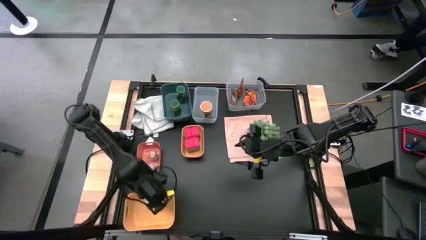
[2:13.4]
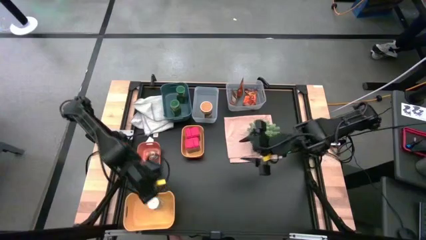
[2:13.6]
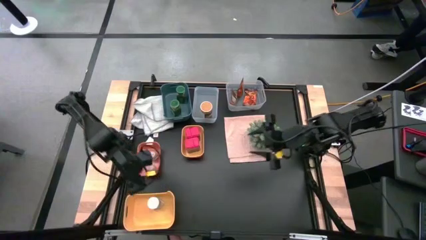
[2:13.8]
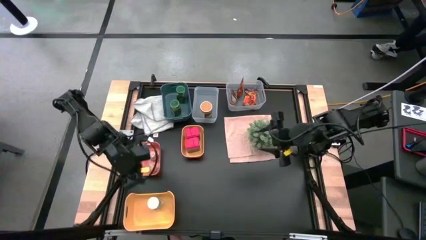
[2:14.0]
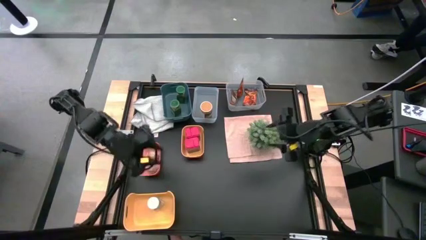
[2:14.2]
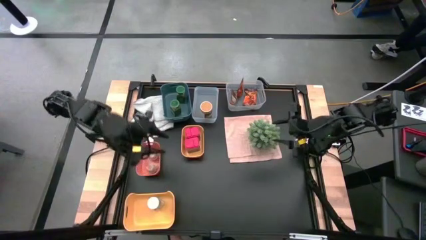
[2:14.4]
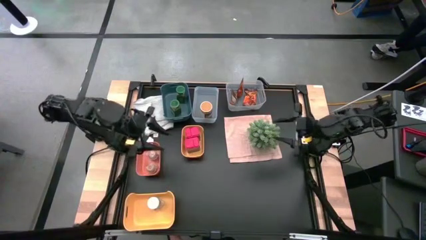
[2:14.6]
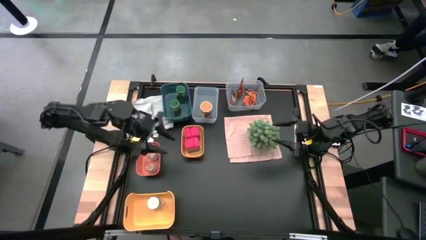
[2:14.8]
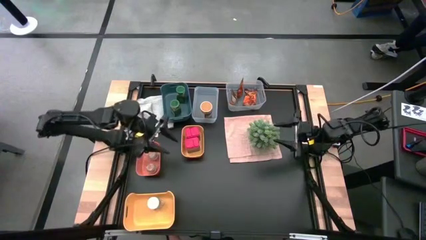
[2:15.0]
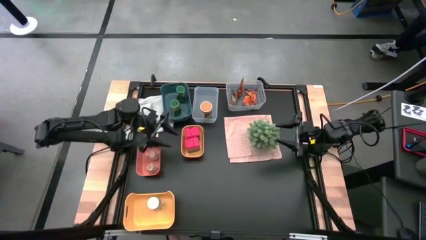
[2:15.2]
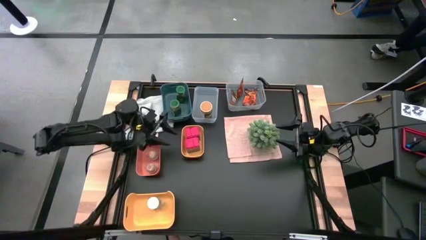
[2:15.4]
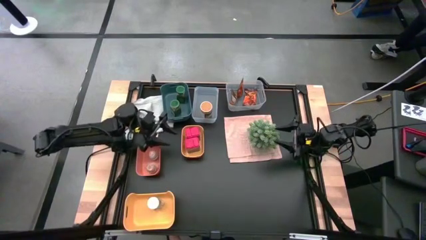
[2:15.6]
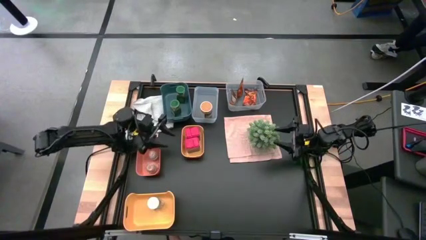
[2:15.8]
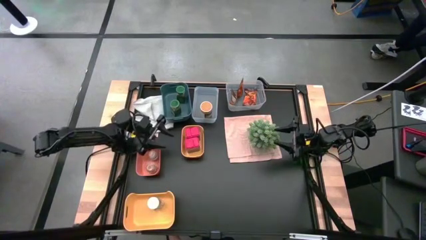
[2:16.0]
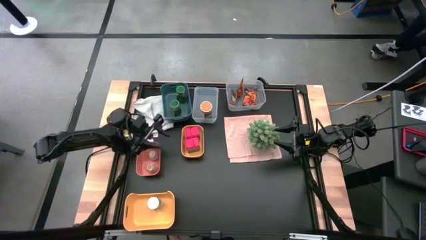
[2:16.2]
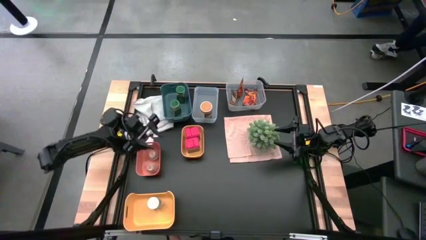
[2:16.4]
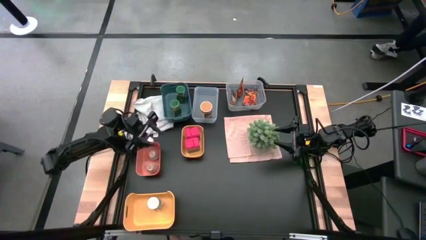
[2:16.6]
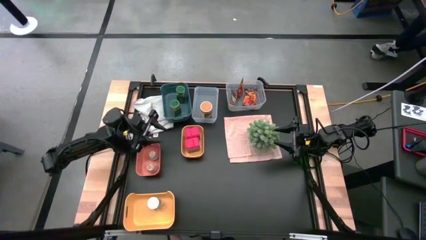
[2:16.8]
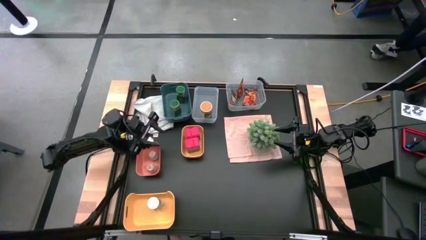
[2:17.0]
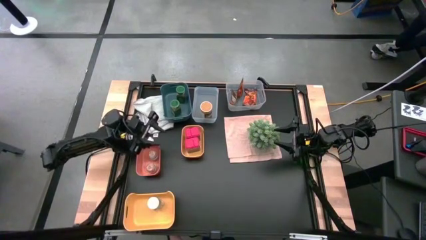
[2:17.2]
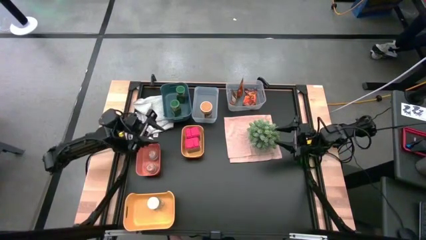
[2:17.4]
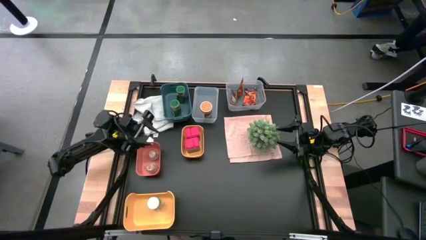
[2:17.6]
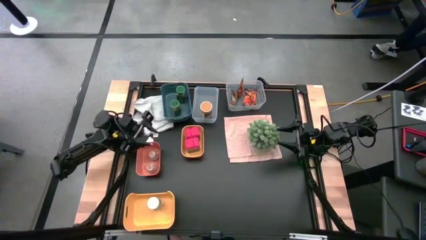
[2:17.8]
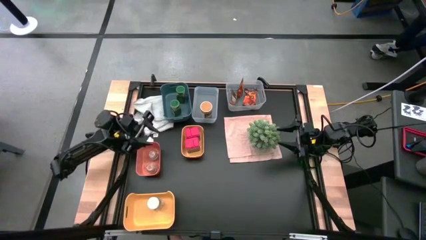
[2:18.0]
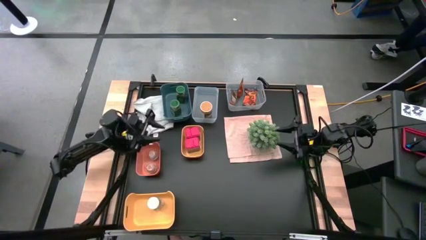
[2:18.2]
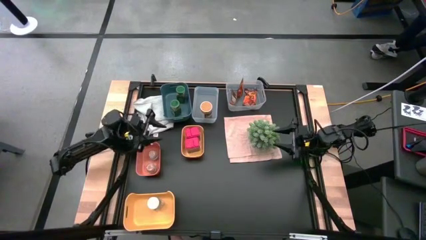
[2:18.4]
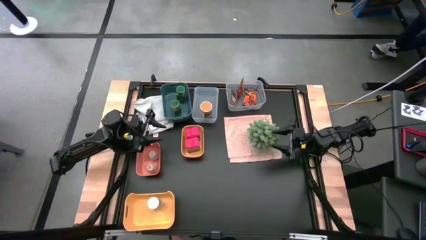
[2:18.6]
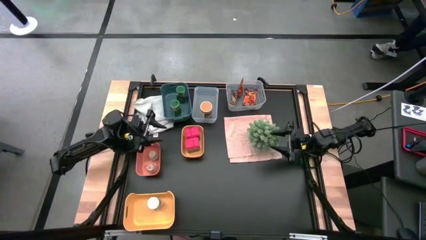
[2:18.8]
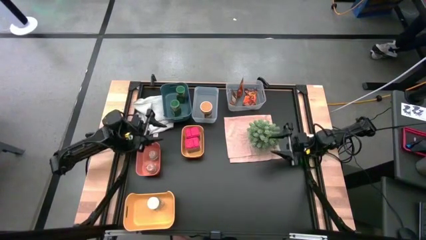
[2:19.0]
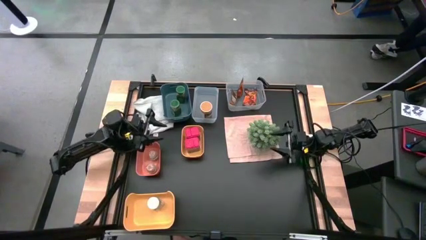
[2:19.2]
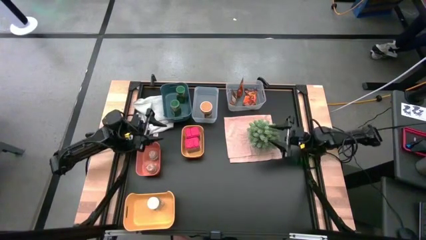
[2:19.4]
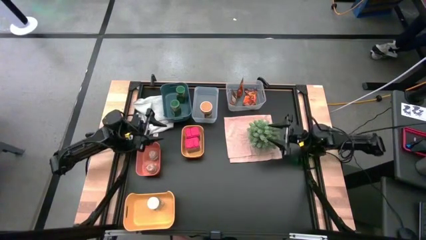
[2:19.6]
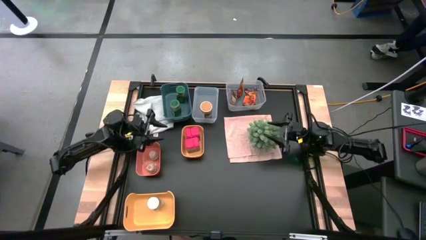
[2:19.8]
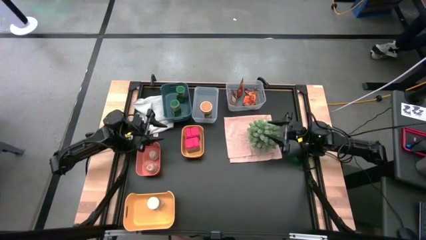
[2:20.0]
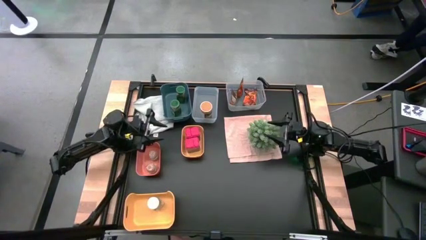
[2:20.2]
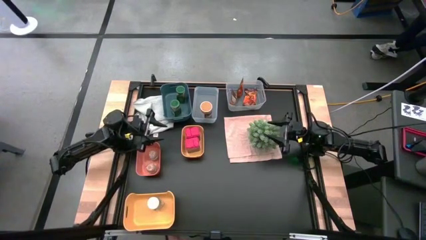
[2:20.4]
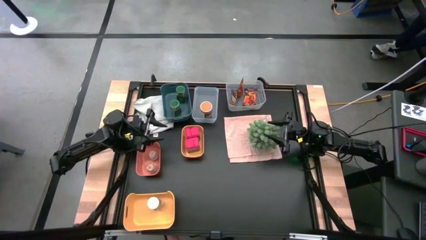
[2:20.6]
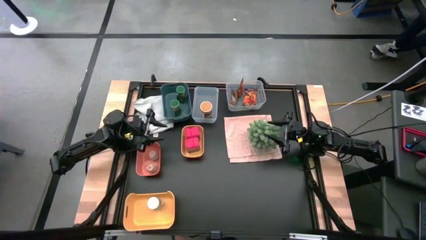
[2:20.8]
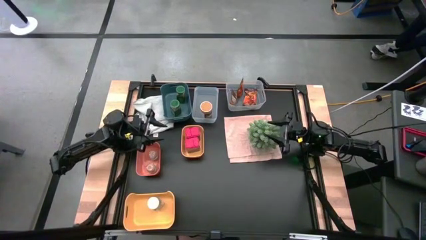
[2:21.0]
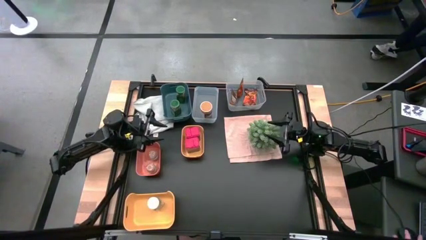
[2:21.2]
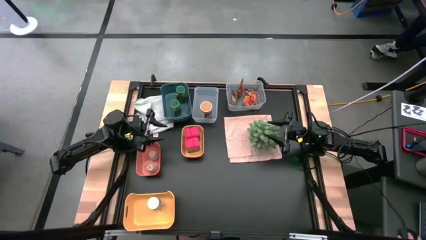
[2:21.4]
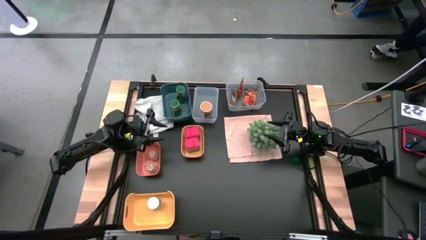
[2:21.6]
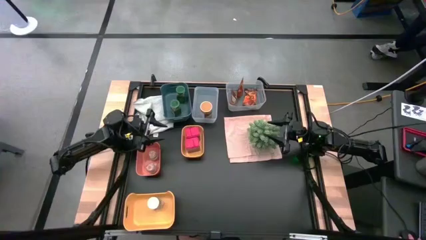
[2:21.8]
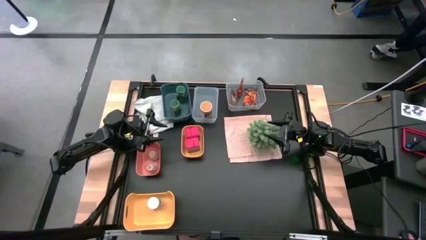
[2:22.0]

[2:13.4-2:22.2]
Task: Sort spices by type
Return to Home Position

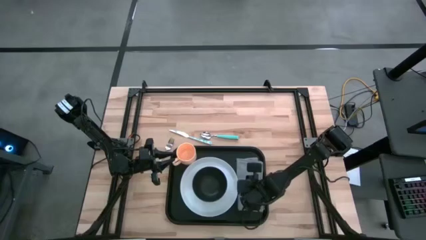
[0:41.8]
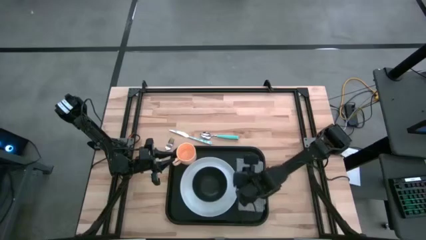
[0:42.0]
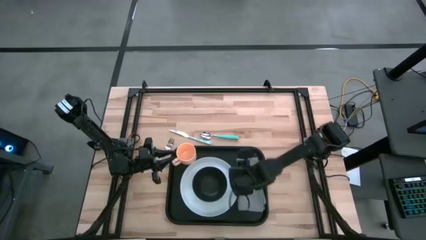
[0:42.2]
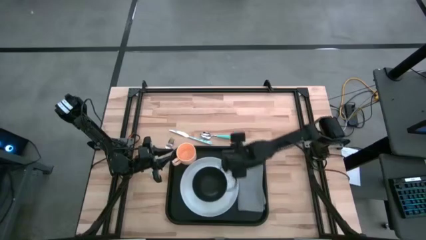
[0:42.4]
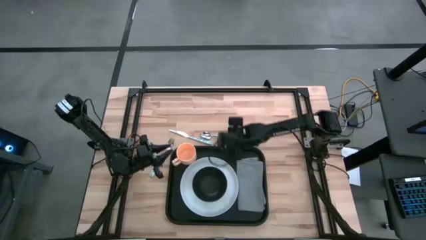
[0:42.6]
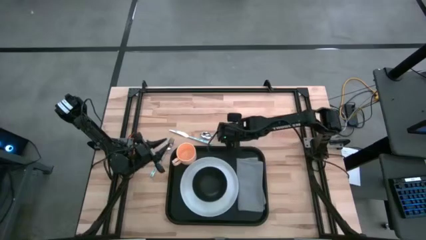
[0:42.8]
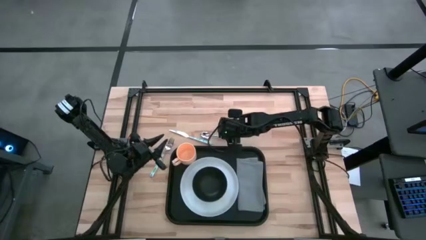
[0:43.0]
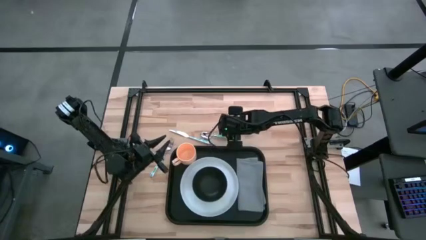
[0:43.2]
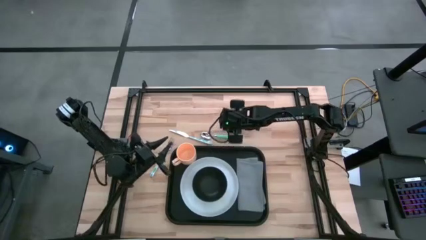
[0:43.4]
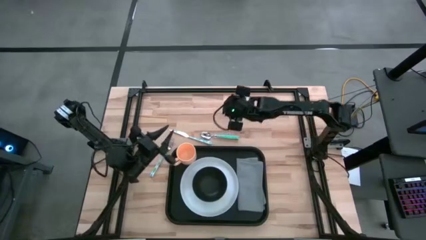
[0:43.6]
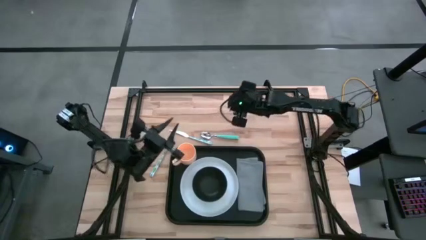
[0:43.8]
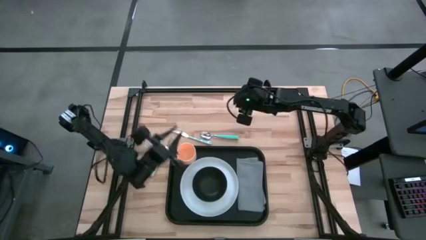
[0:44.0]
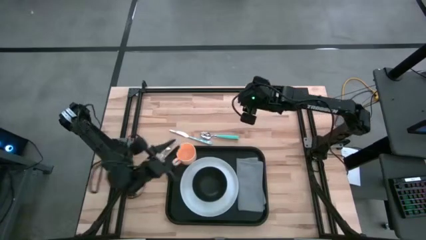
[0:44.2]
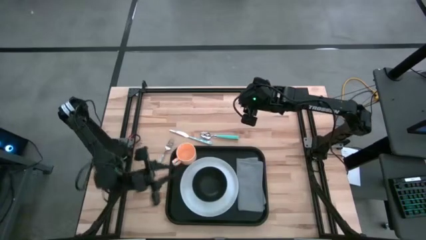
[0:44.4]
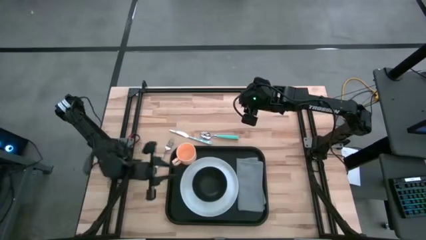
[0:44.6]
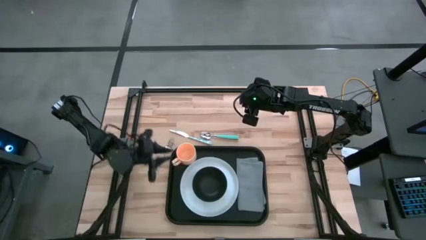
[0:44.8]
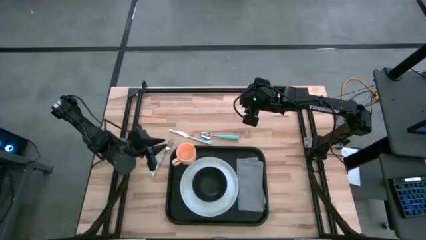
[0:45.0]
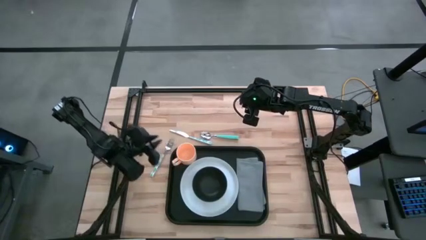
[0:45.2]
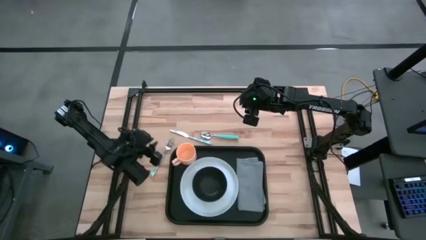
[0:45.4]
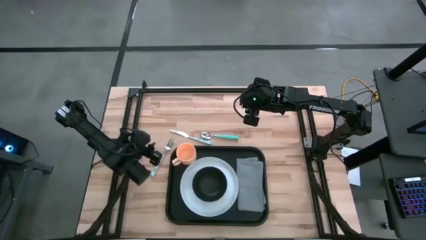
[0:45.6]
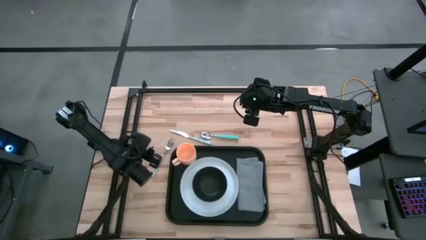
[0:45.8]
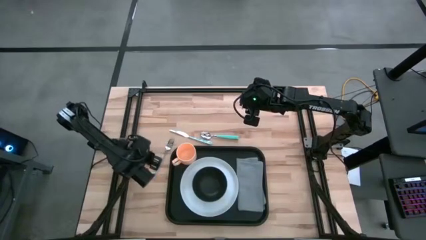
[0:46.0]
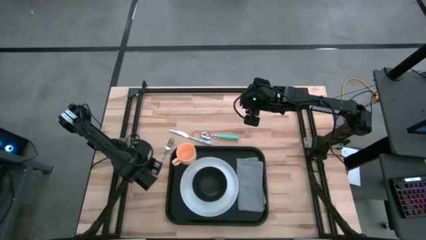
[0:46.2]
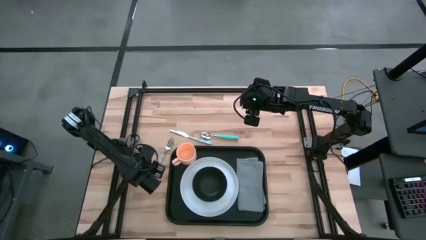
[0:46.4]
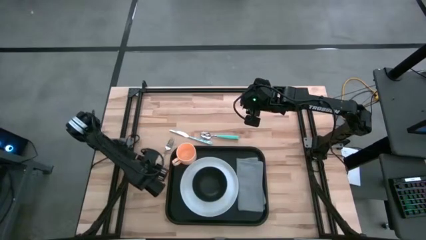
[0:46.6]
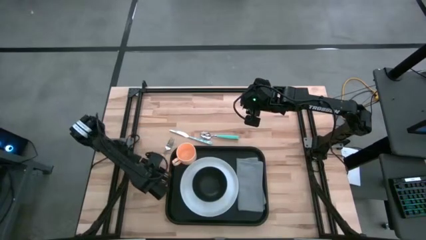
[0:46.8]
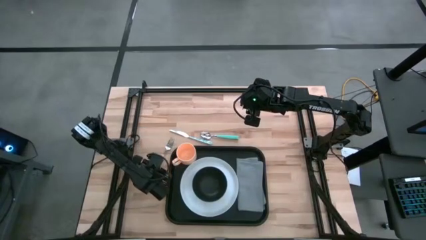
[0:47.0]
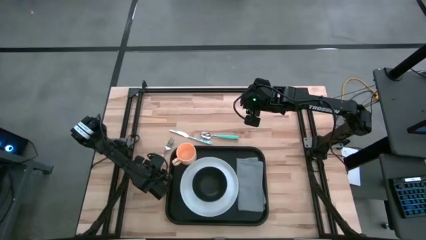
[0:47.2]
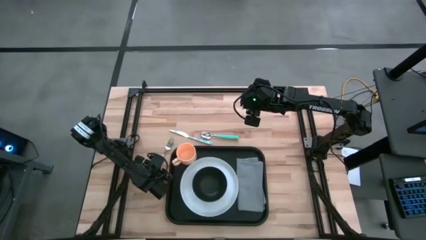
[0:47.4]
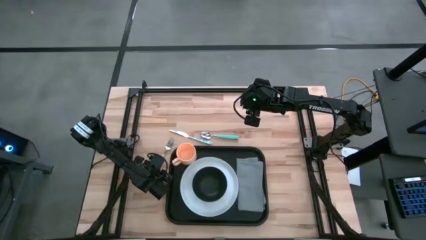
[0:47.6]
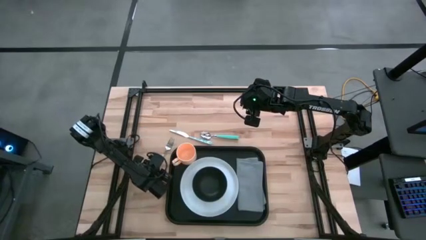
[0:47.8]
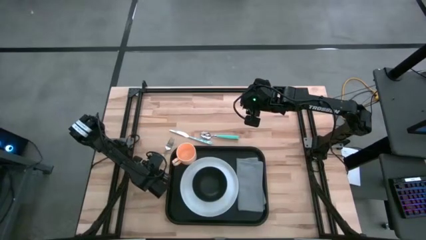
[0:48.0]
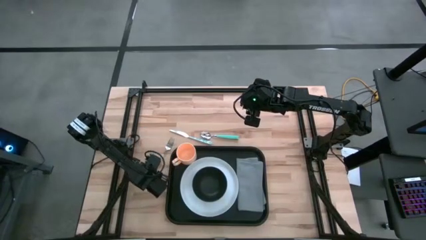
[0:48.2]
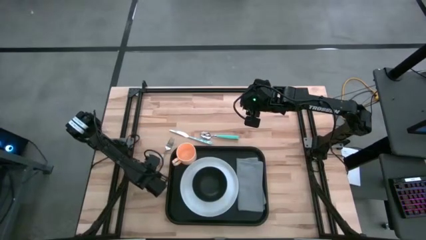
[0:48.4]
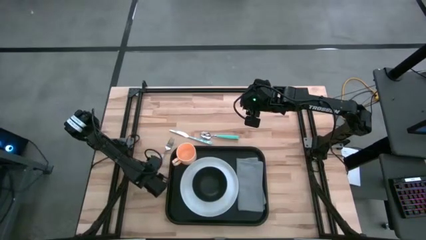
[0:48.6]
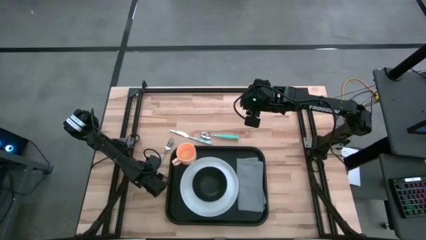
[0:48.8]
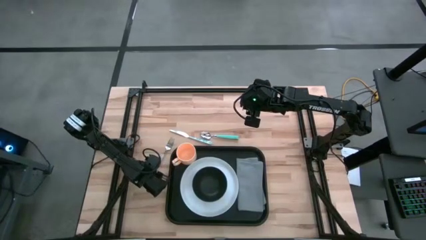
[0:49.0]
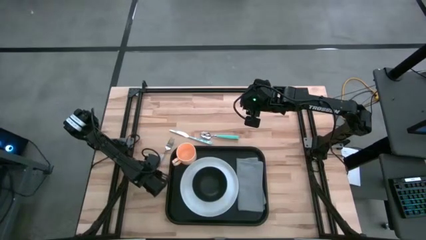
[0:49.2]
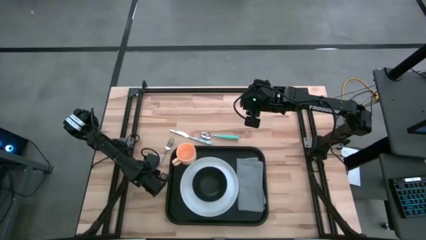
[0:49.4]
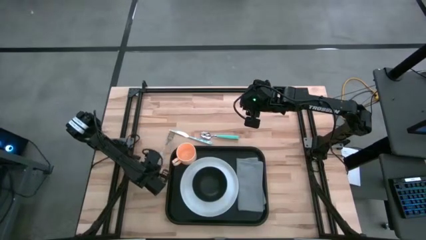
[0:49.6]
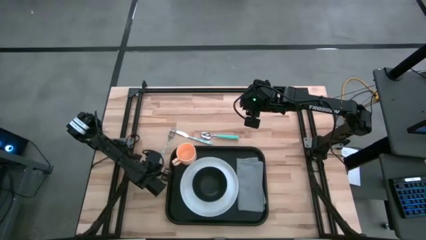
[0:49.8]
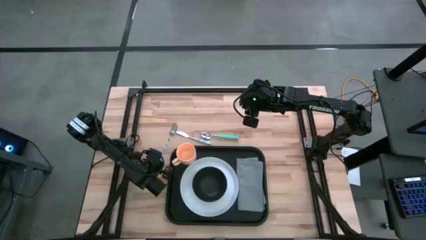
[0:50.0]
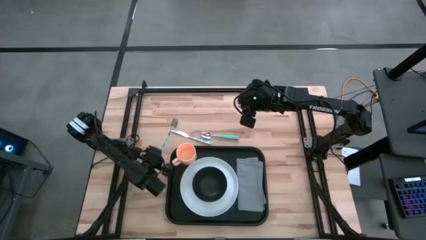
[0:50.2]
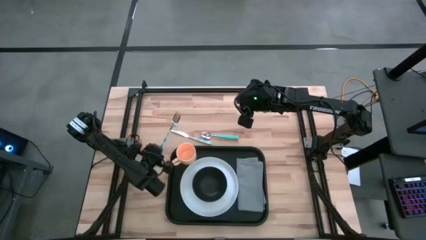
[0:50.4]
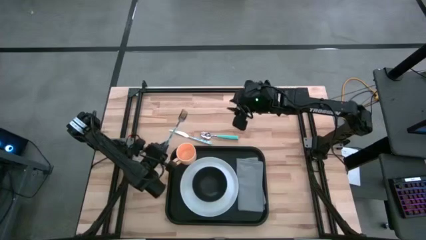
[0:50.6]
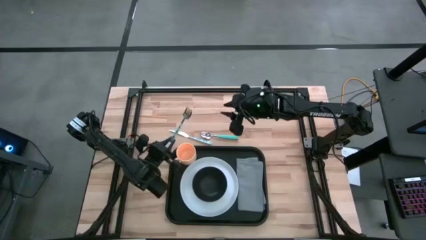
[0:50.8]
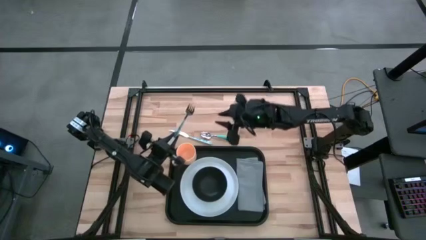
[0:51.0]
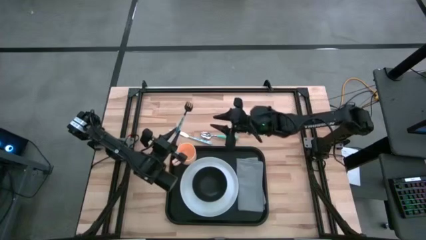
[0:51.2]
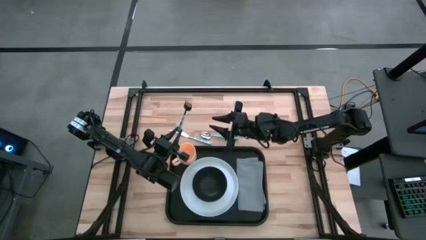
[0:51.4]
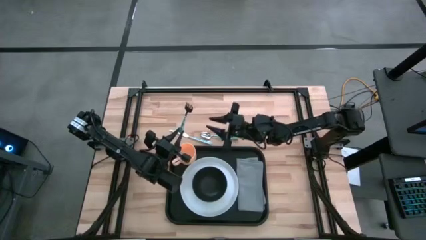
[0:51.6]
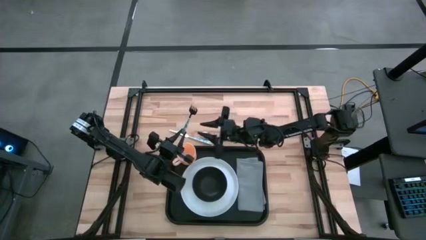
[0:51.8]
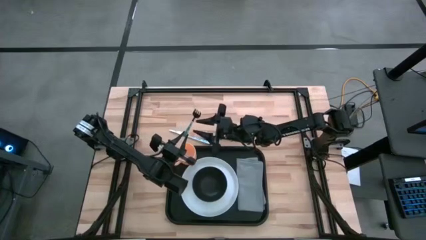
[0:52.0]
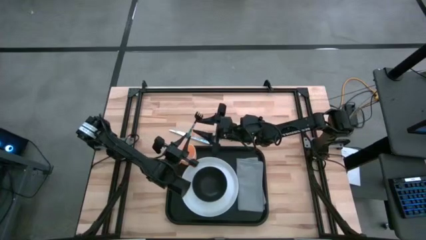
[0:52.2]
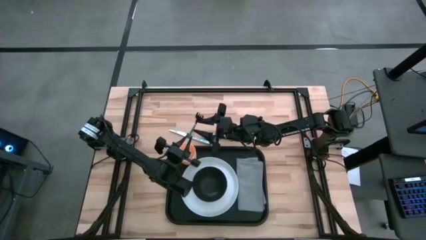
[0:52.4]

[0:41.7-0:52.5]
Task: Set up tray
Put the blue fork on the gray napkin on the black tray
